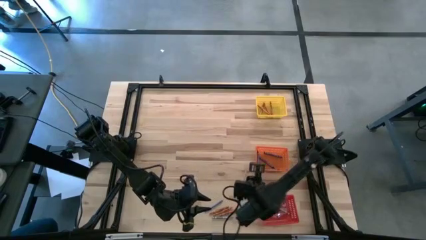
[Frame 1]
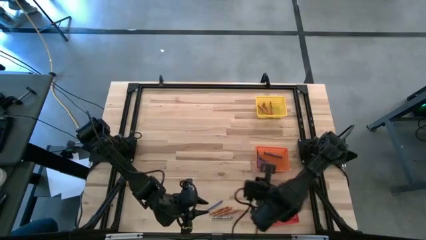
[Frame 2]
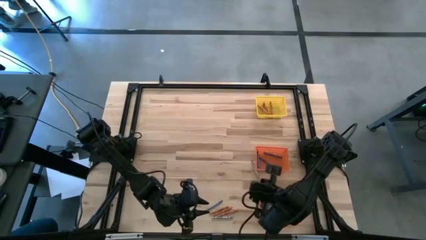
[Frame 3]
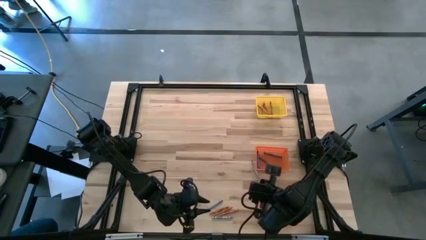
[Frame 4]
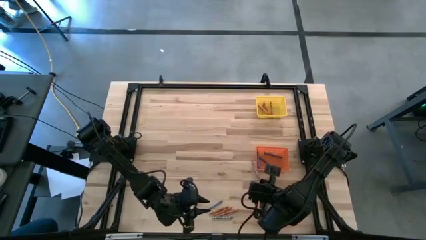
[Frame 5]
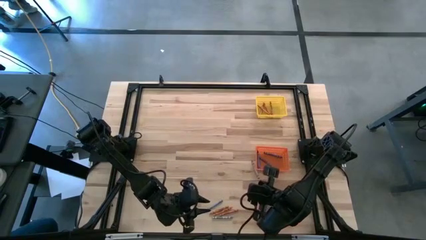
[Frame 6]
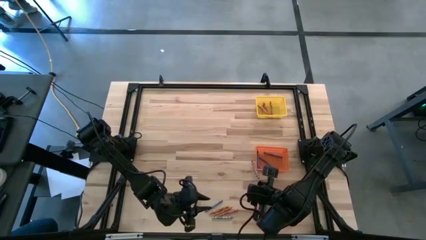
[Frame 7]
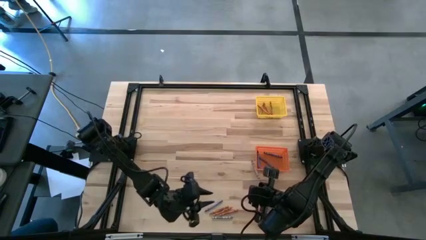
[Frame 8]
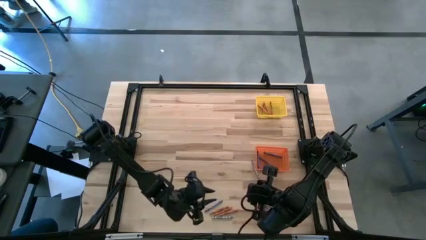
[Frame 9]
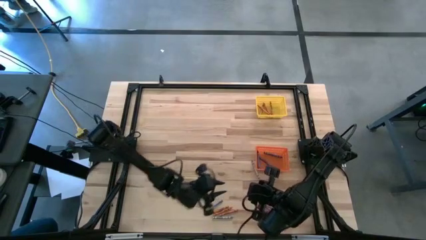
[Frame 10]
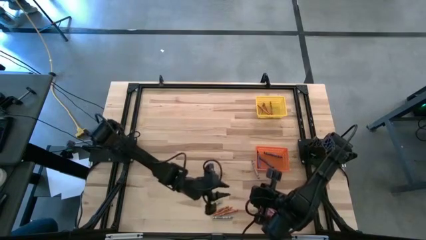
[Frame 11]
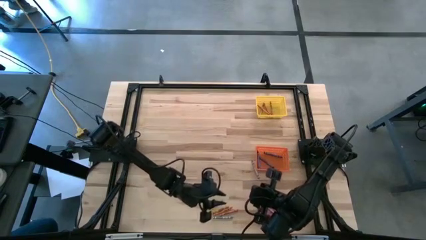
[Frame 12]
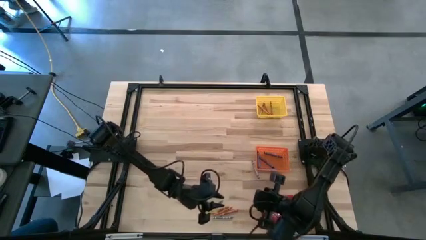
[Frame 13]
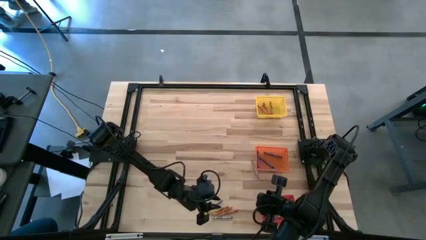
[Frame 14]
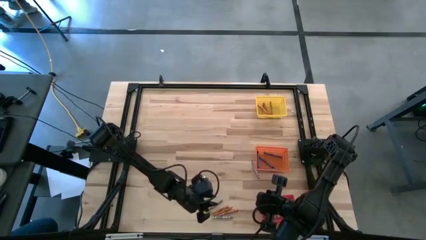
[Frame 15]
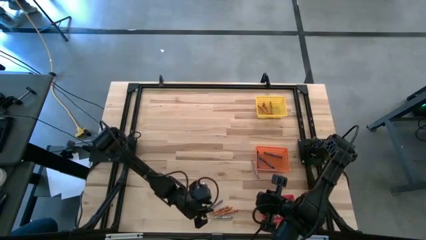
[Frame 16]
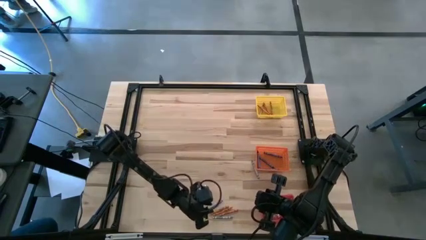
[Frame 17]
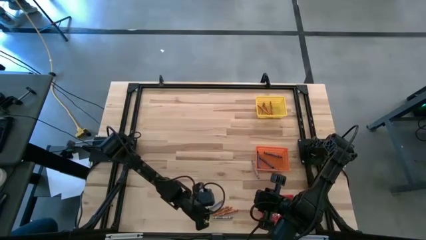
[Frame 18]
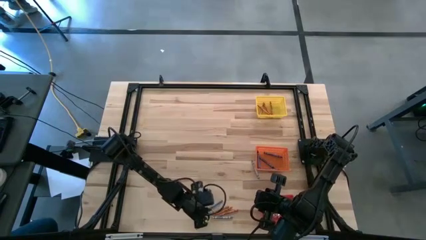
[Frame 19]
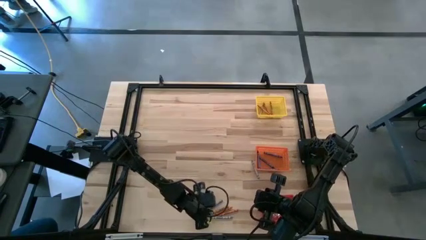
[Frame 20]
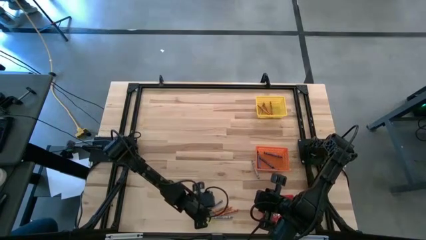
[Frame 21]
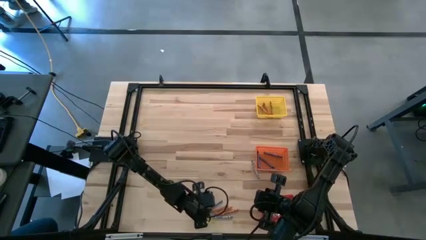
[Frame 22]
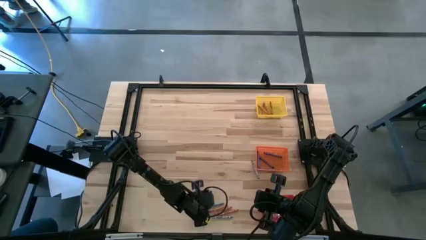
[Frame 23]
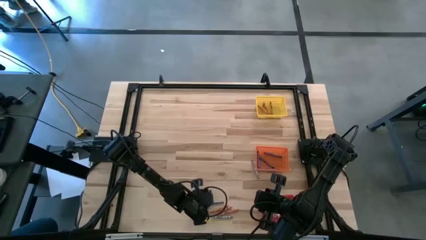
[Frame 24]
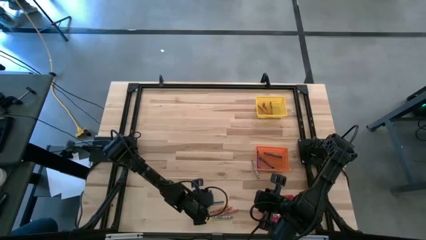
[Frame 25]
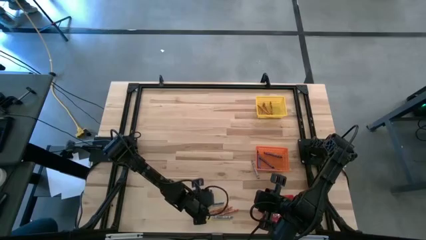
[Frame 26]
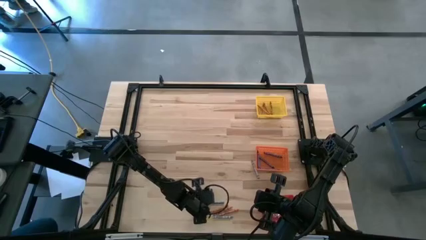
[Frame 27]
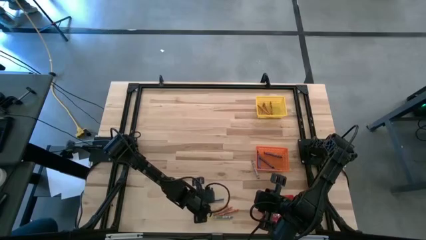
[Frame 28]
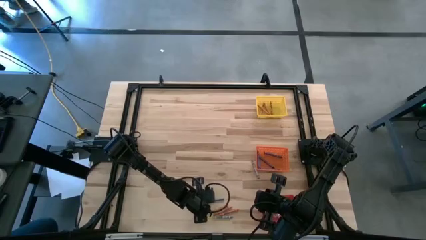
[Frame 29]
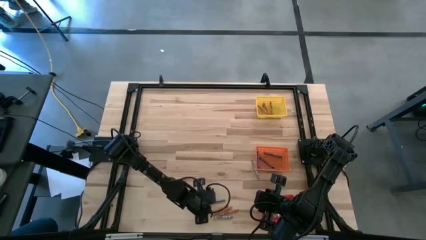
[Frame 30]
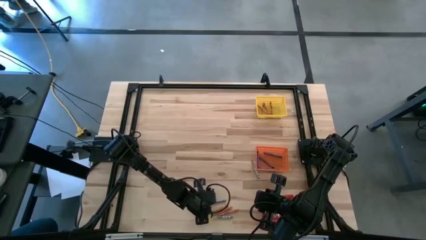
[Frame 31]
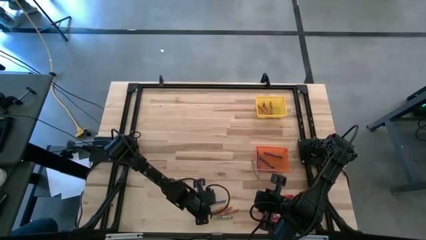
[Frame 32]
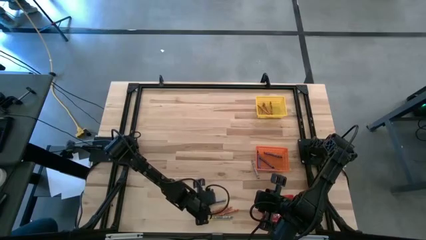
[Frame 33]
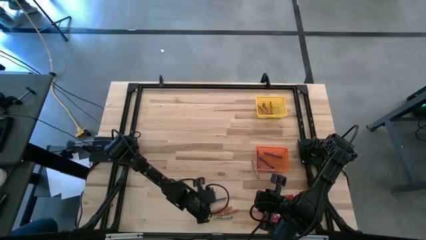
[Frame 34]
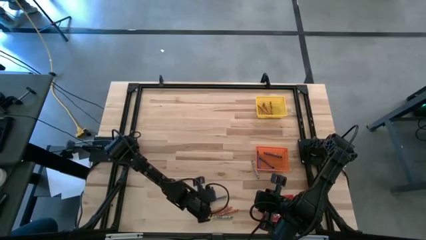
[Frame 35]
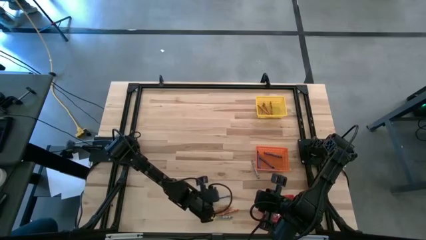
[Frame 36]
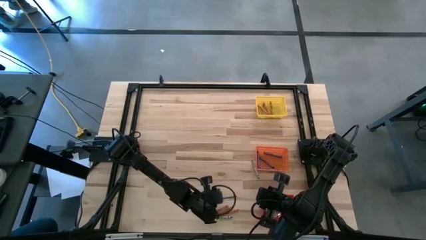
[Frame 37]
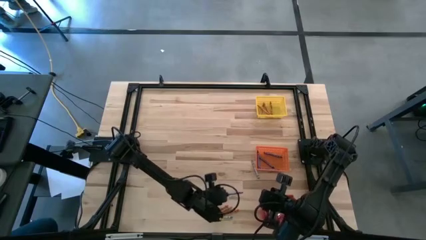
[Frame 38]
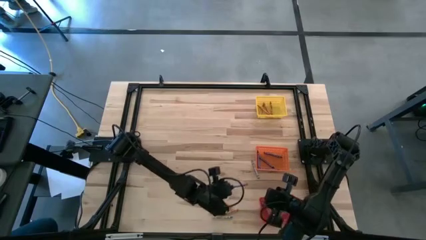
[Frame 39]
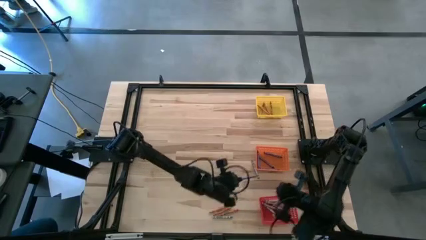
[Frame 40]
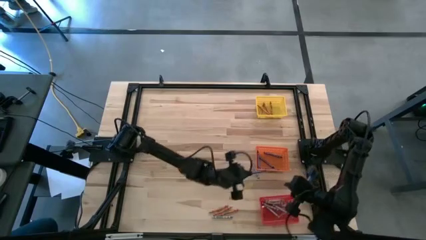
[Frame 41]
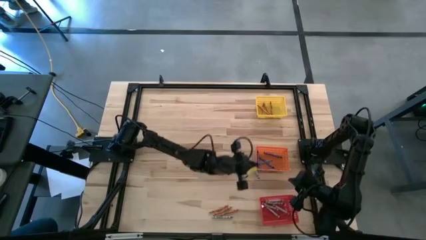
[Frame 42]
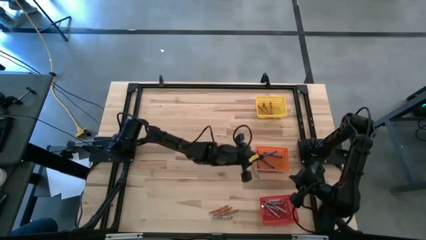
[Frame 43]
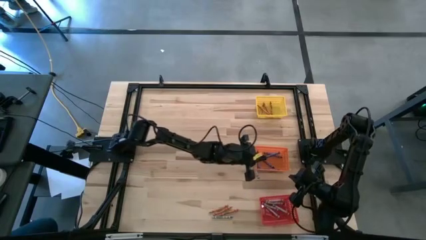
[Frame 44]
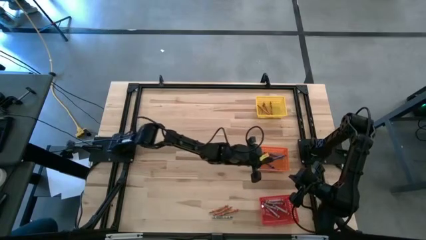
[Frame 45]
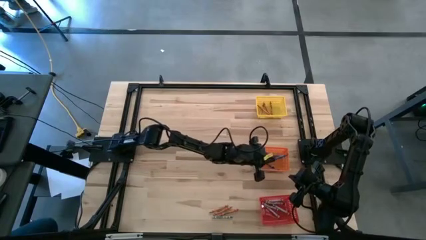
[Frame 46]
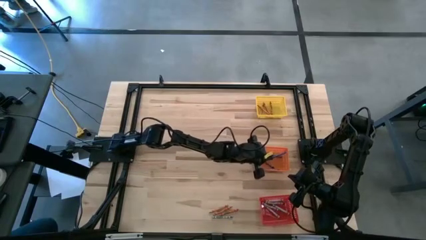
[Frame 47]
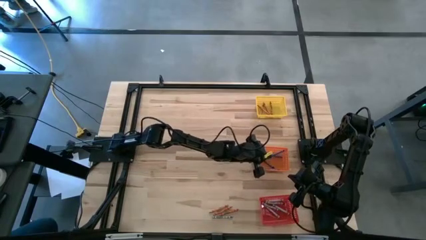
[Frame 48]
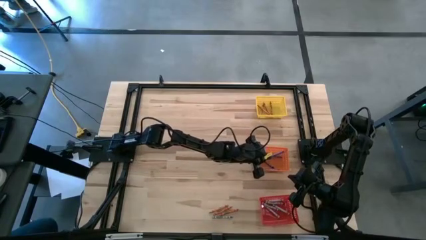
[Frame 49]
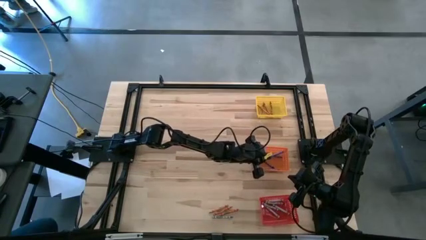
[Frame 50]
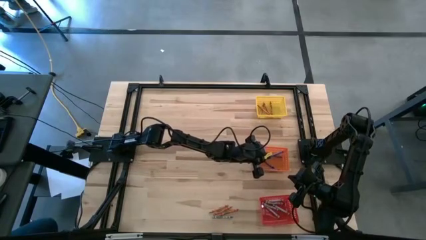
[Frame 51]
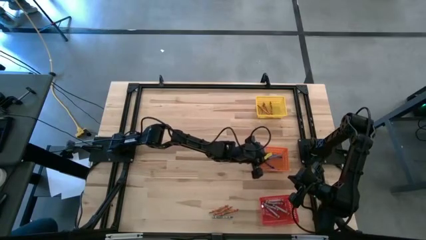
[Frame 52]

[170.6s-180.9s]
Task: Sort crayons
Put the blue crayon into the orange bin
